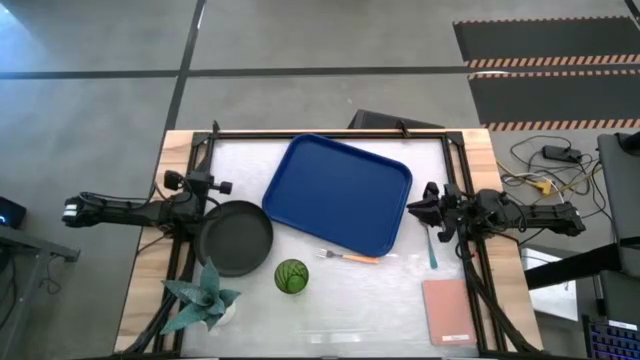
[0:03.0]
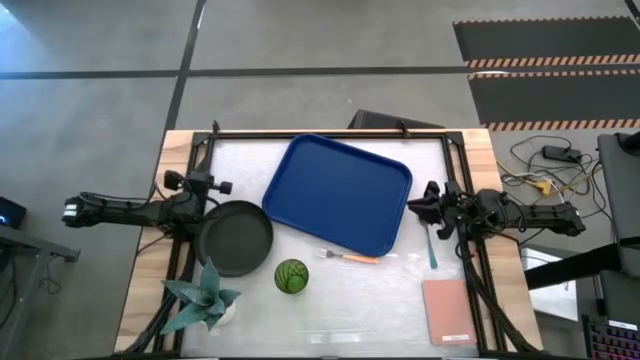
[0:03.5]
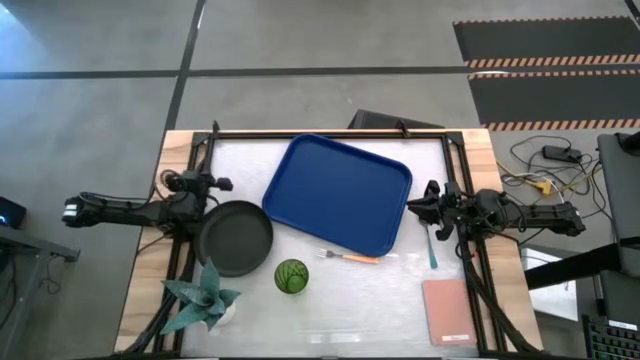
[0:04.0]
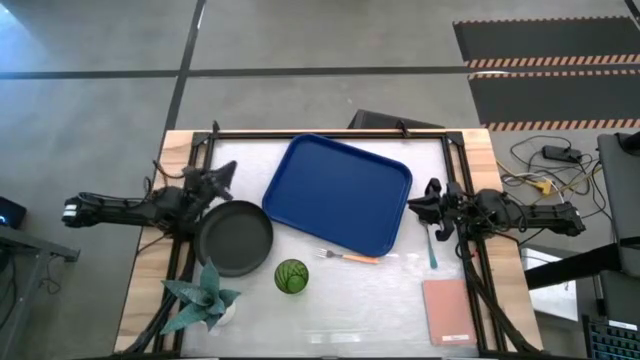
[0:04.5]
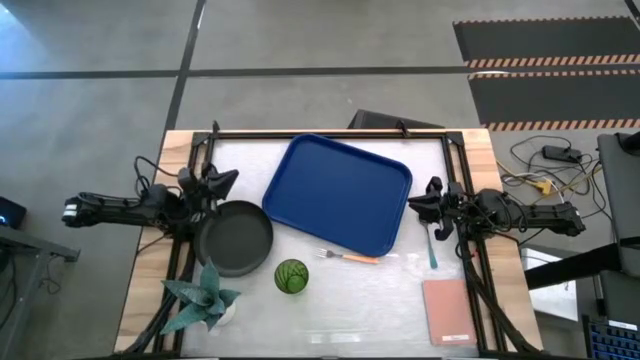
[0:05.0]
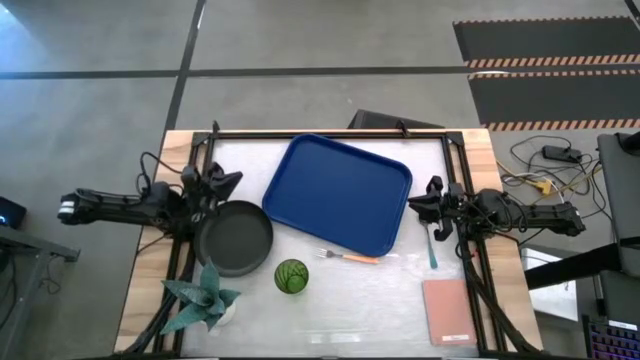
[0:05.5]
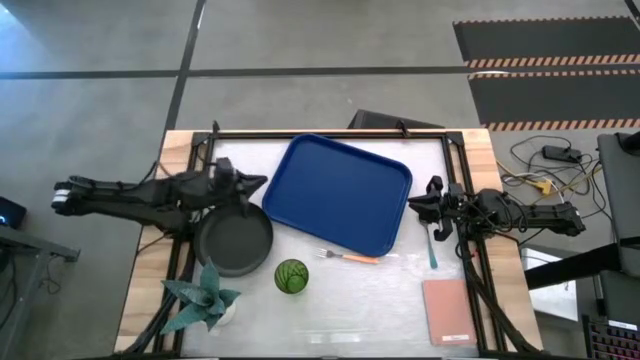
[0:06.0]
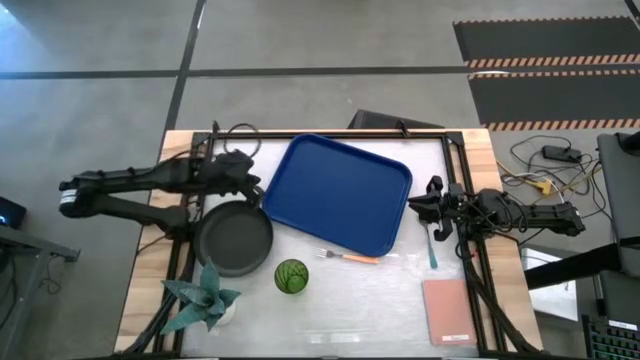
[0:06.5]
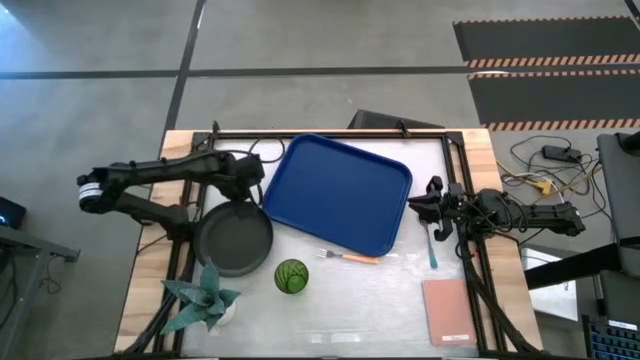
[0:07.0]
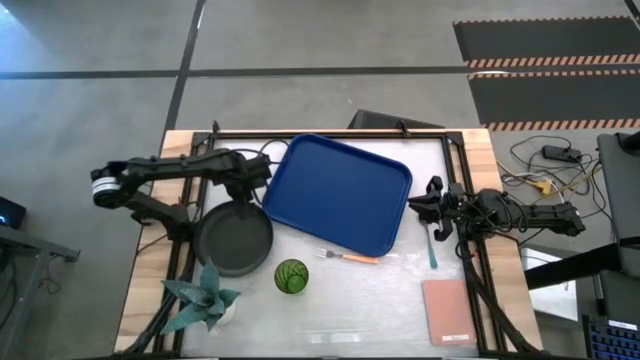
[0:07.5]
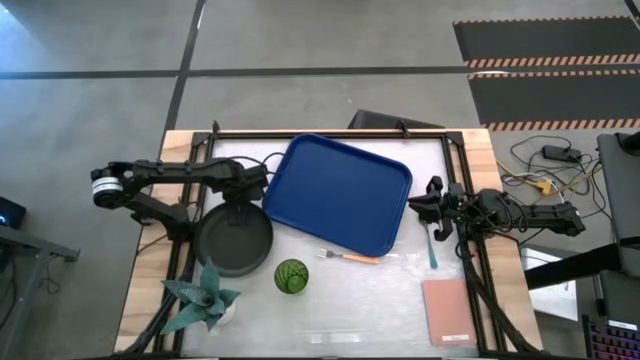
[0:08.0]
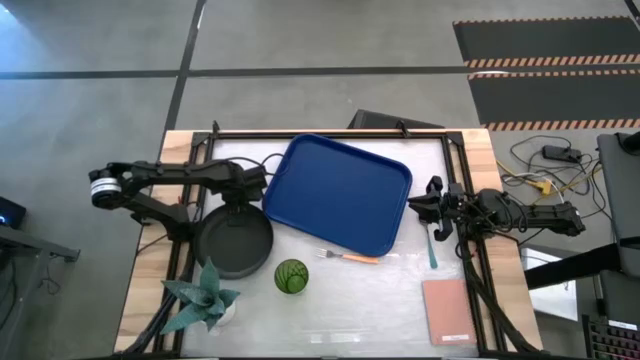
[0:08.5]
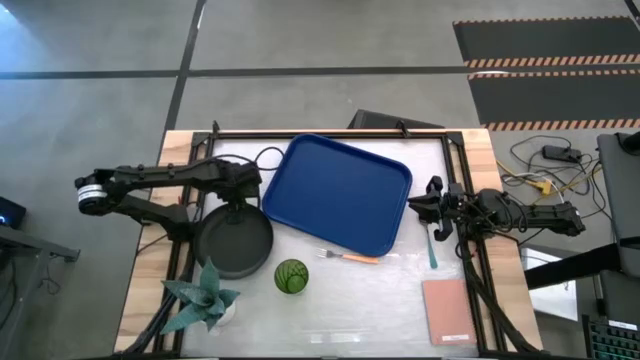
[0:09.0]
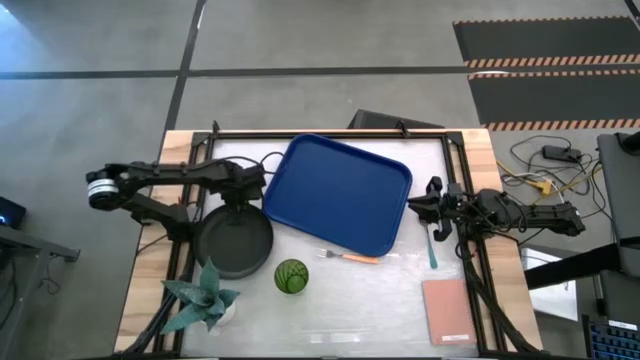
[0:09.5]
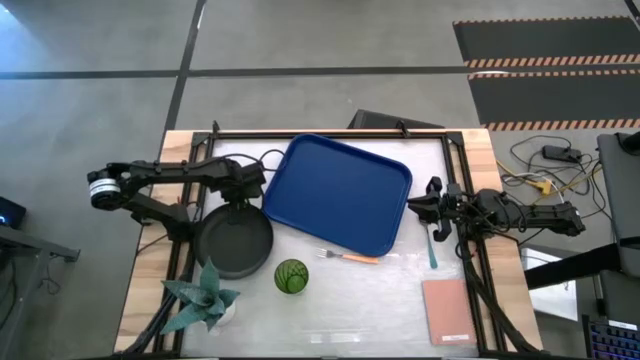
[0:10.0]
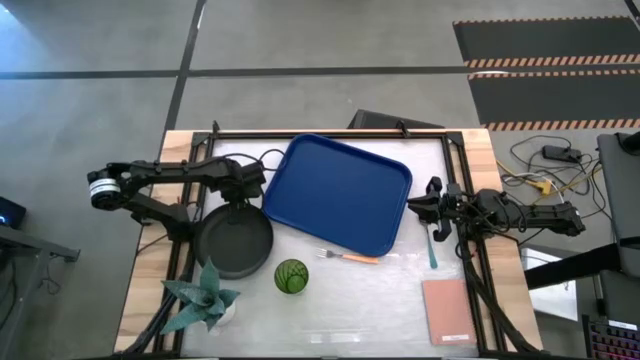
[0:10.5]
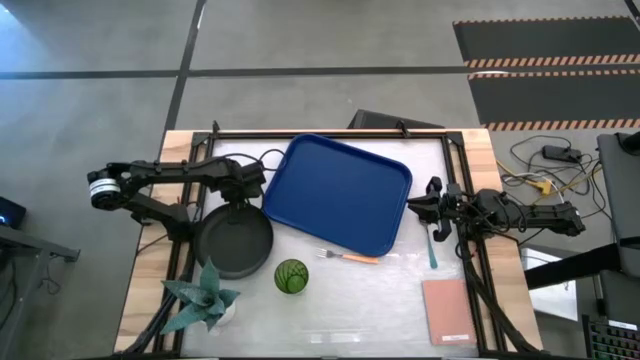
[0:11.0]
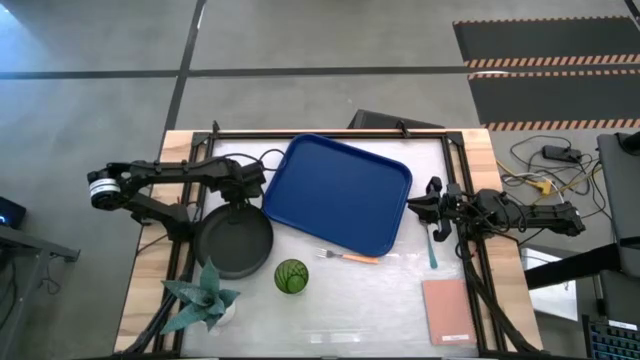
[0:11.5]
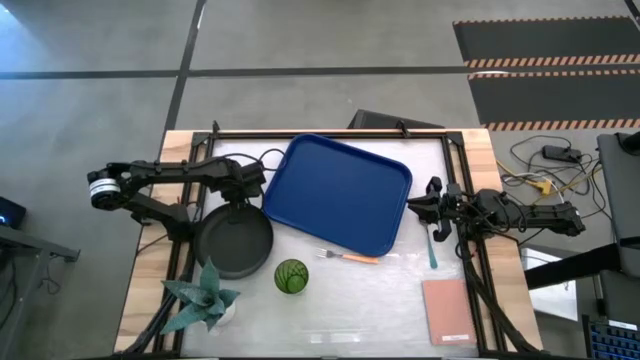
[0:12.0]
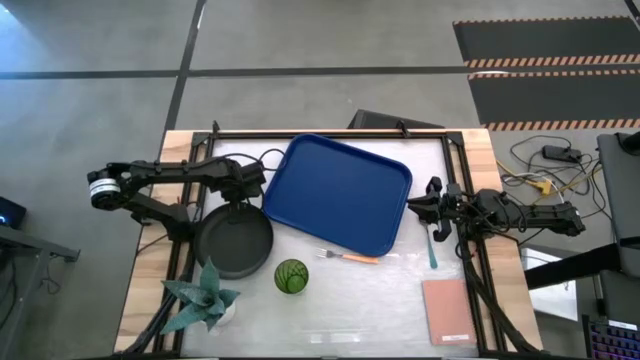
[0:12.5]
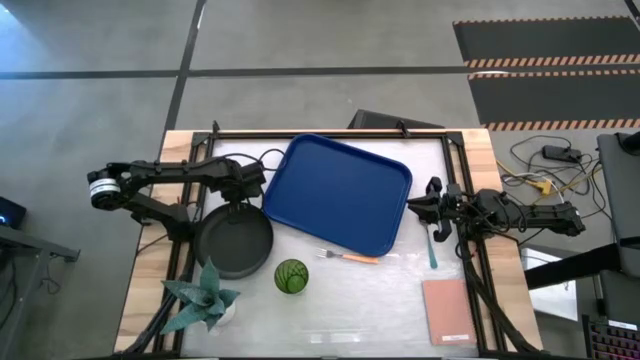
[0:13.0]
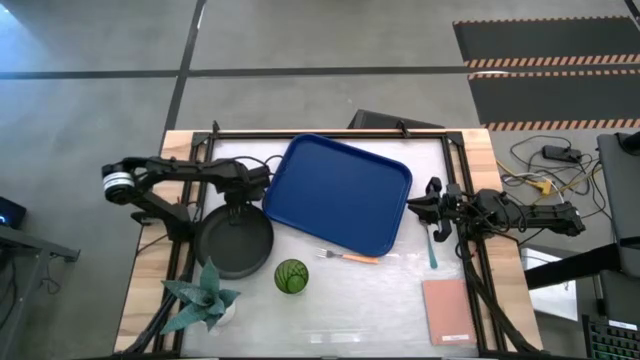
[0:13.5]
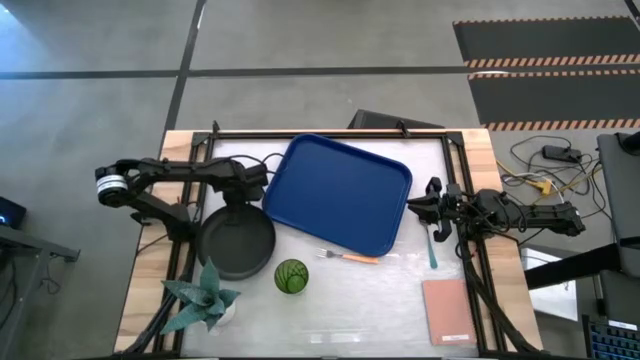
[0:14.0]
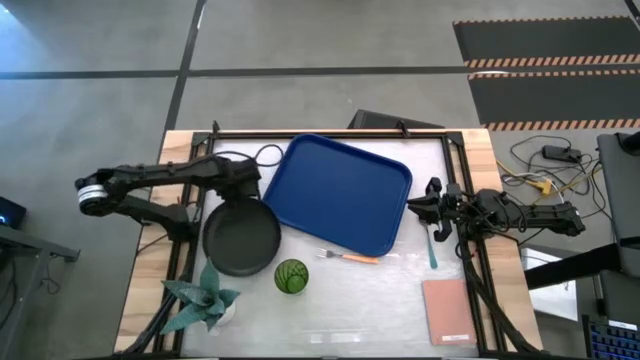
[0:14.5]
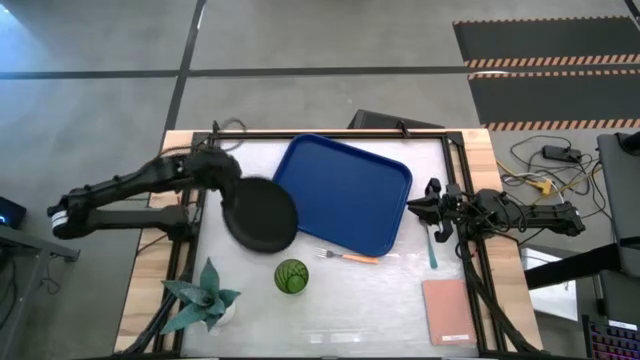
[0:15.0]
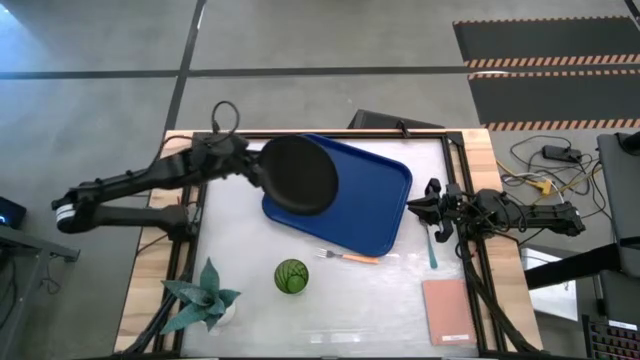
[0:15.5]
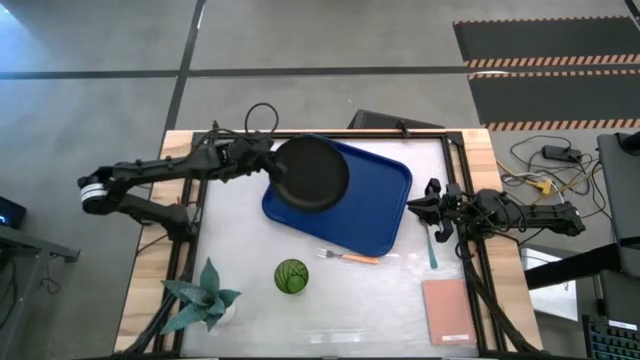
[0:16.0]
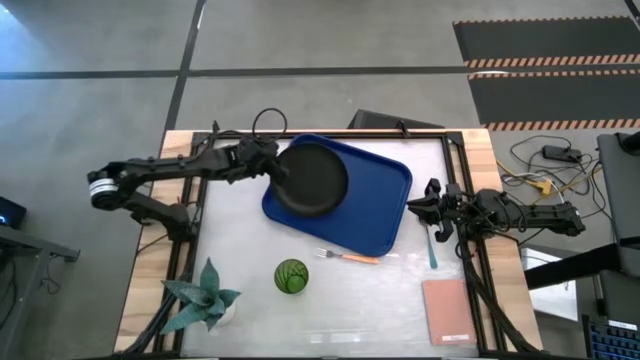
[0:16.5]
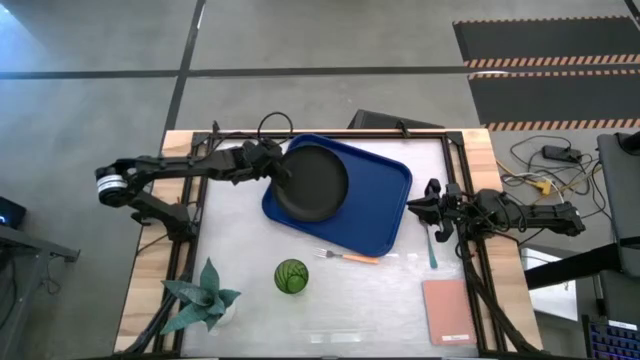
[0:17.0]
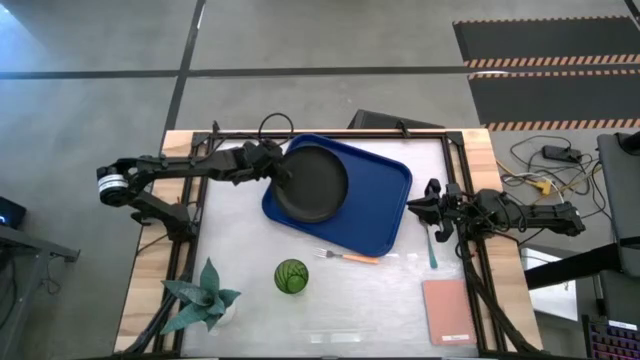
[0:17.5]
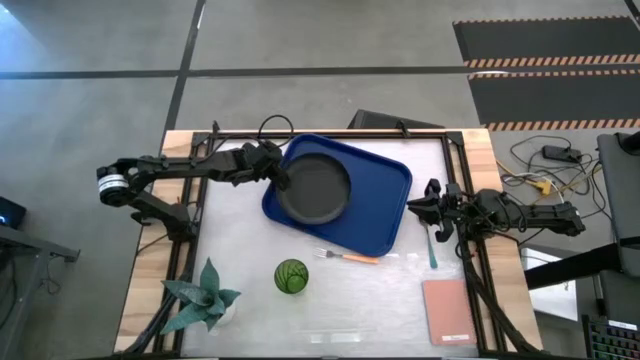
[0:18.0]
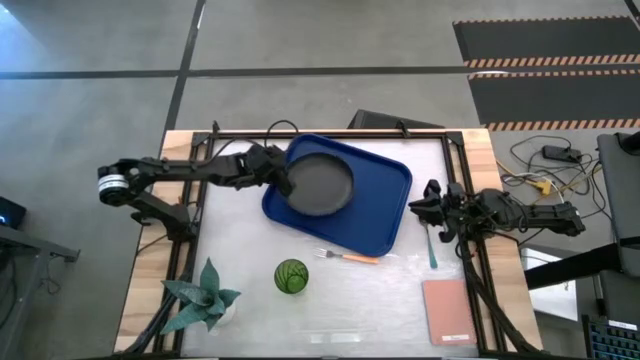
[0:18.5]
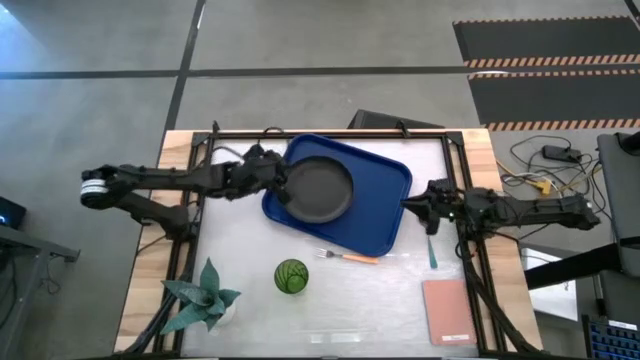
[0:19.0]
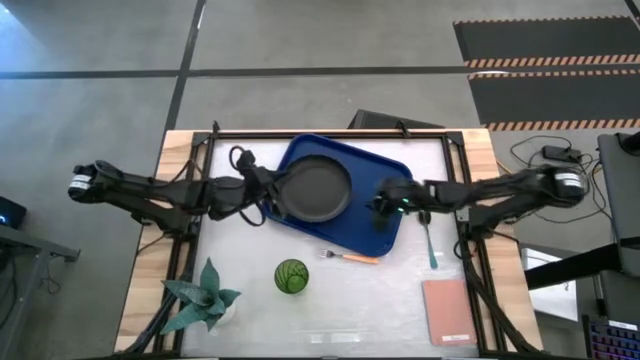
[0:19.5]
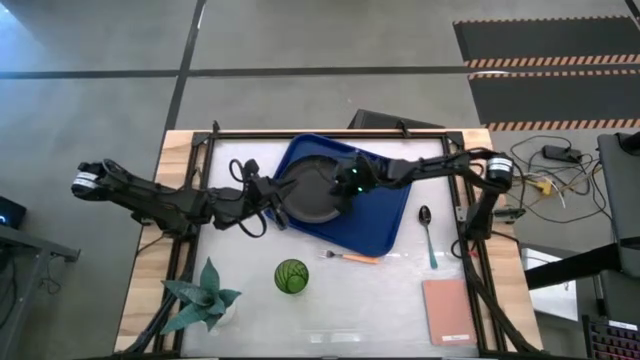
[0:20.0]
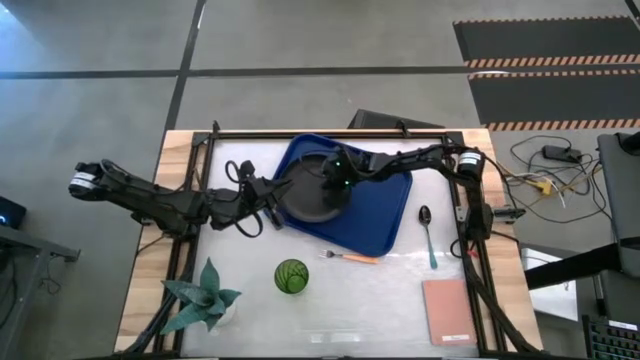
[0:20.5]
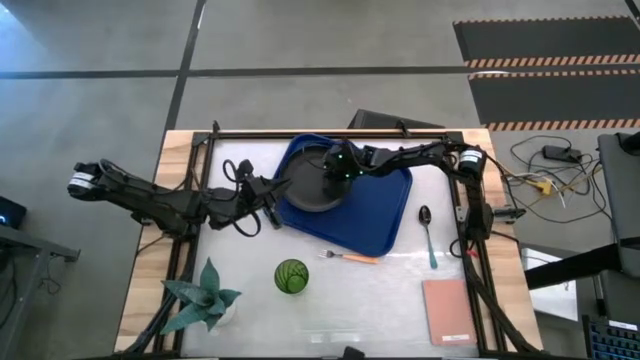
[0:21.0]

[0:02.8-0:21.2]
Task: Pick and place plate/cup/fork/spoon on tray
Put the black plate on the blue tray

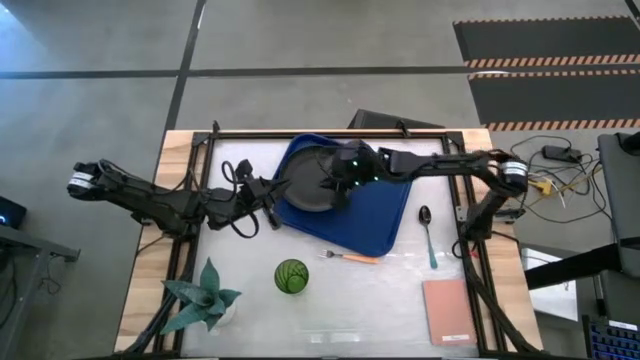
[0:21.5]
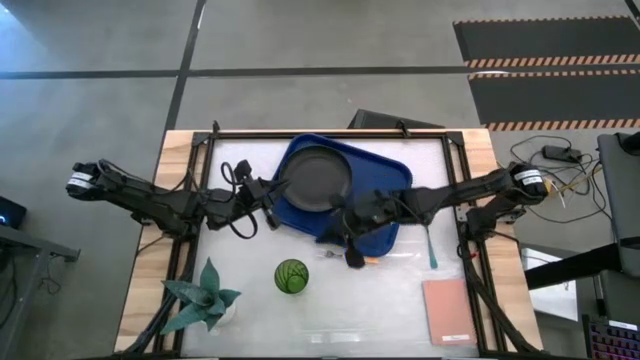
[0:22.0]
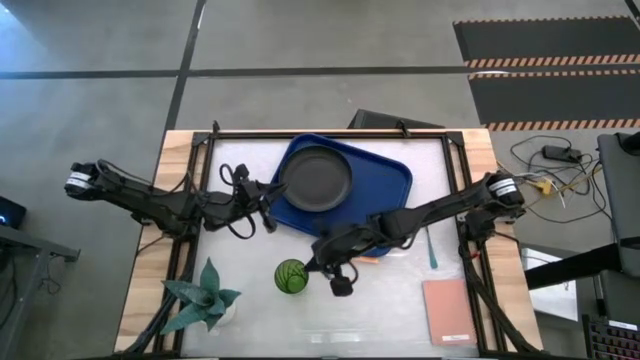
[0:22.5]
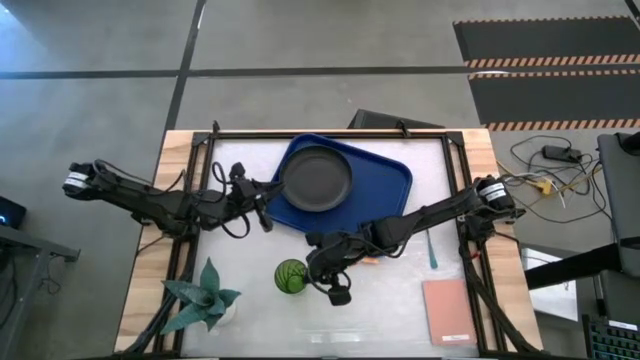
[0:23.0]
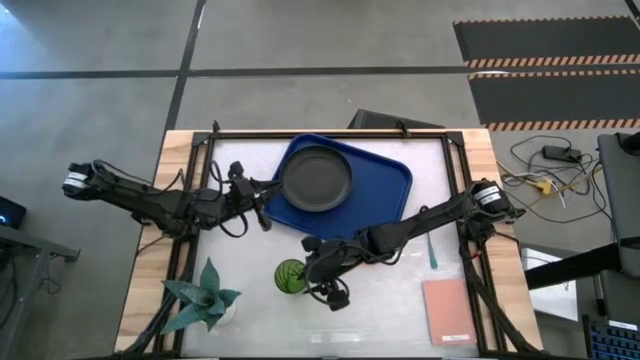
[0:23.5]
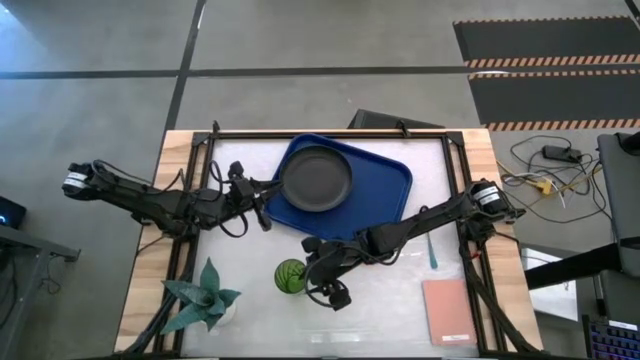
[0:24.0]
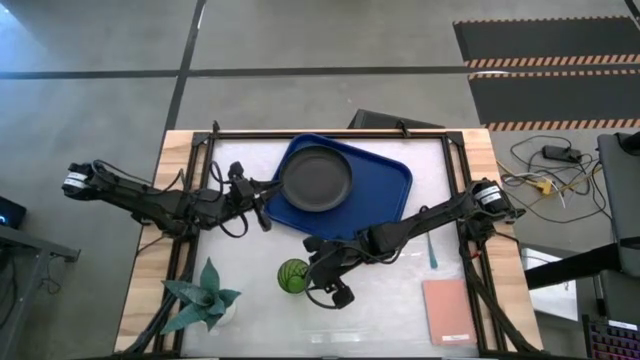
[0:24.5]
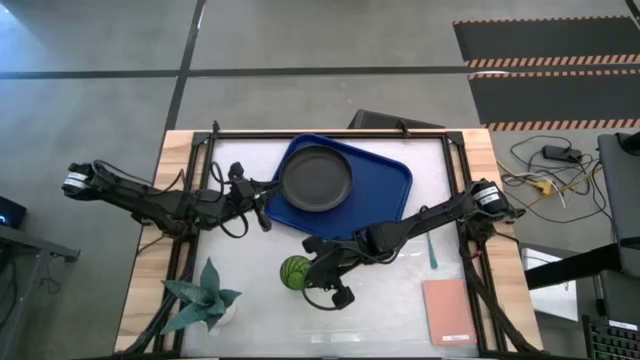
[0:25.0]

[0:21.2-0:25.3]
Put the green cup on the blue tray to the top right of the black plate
